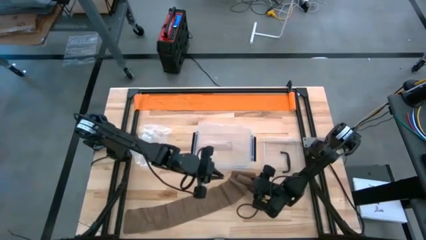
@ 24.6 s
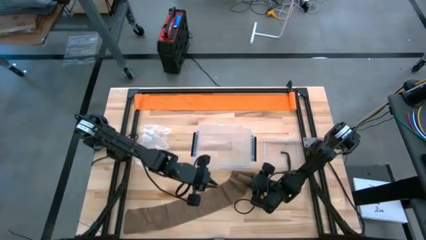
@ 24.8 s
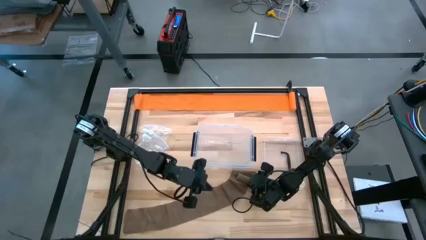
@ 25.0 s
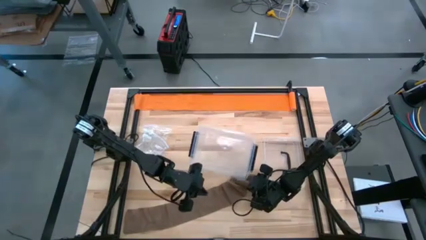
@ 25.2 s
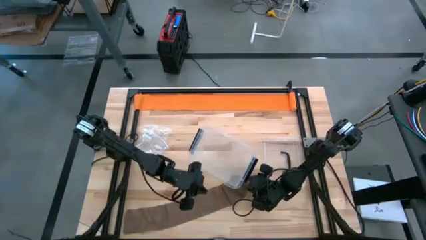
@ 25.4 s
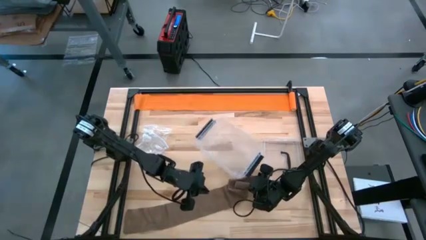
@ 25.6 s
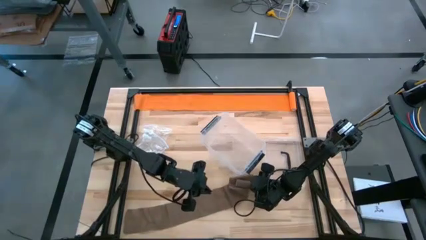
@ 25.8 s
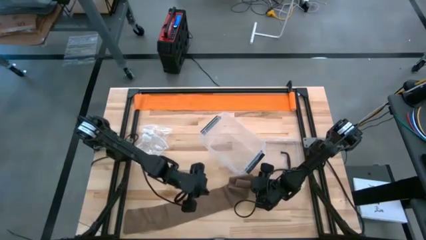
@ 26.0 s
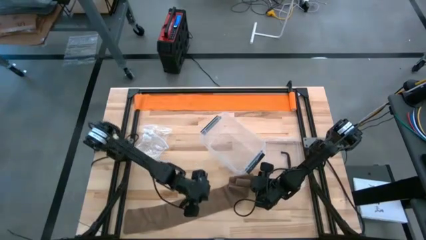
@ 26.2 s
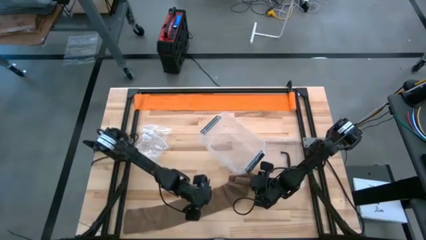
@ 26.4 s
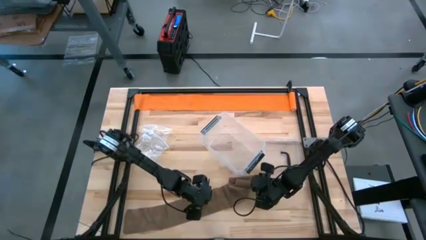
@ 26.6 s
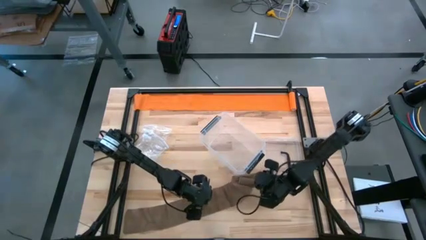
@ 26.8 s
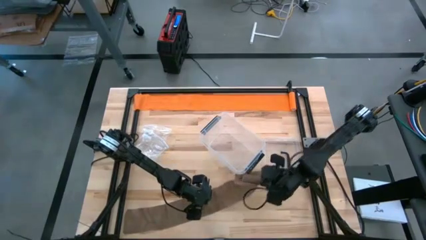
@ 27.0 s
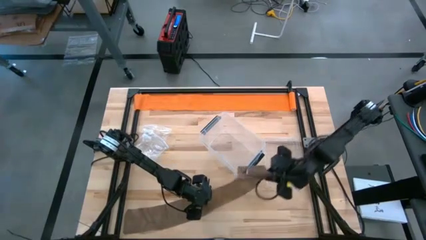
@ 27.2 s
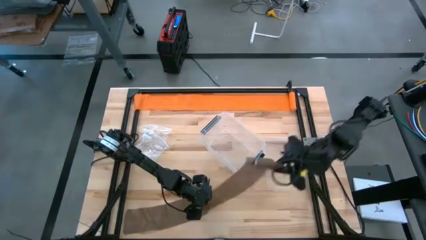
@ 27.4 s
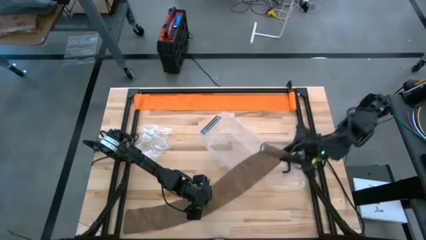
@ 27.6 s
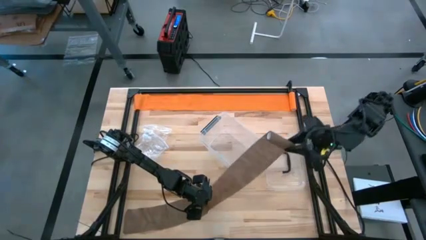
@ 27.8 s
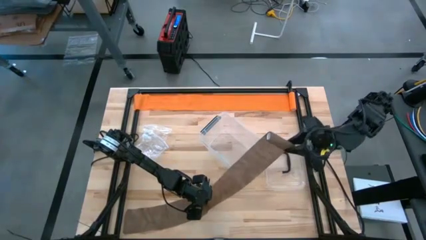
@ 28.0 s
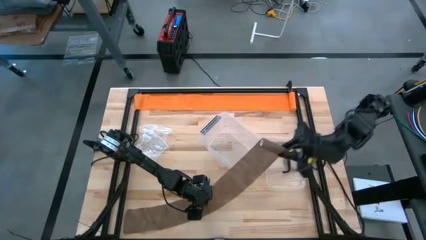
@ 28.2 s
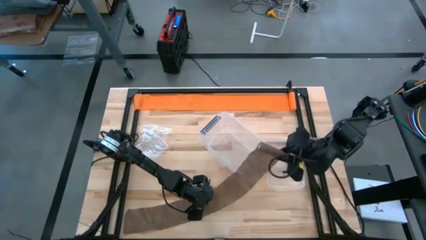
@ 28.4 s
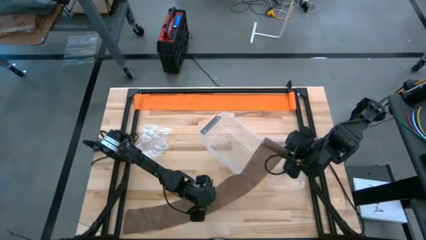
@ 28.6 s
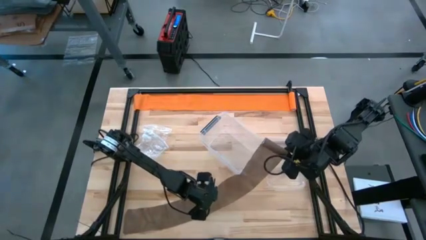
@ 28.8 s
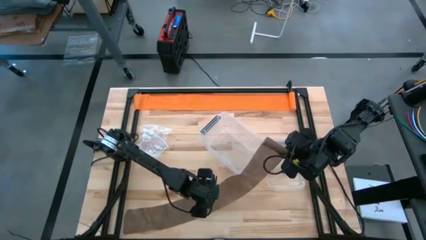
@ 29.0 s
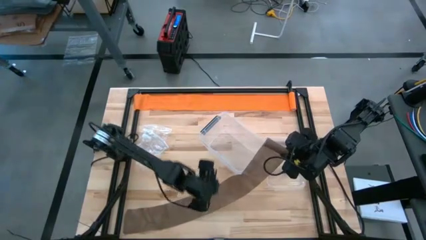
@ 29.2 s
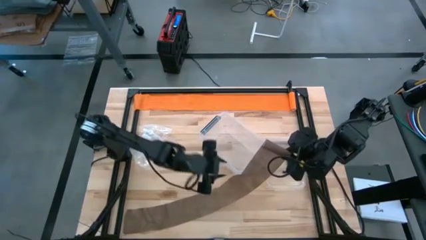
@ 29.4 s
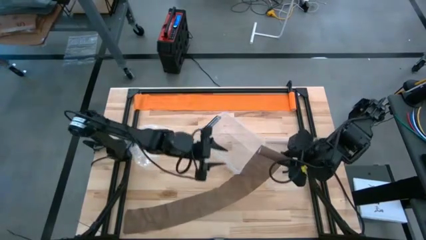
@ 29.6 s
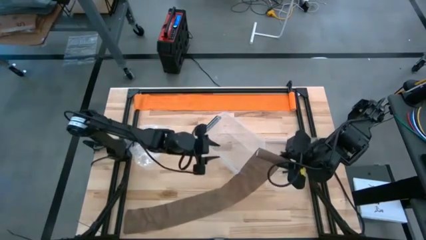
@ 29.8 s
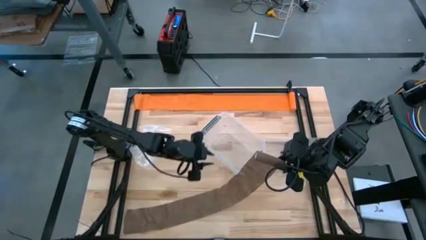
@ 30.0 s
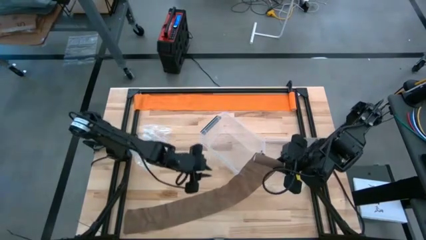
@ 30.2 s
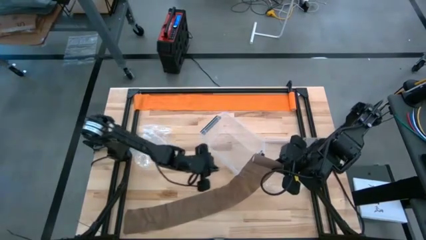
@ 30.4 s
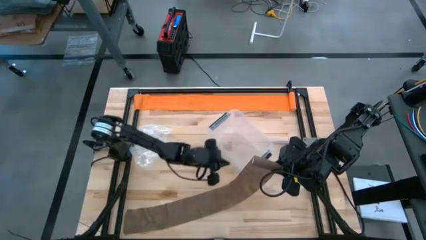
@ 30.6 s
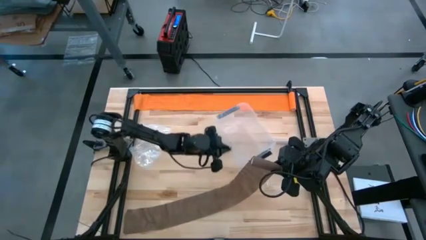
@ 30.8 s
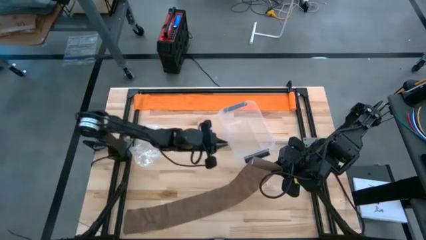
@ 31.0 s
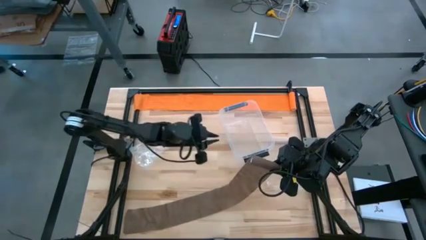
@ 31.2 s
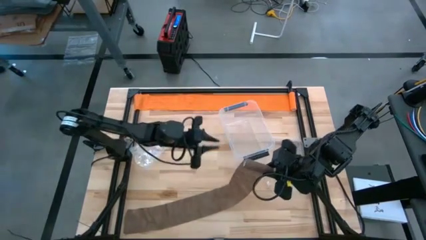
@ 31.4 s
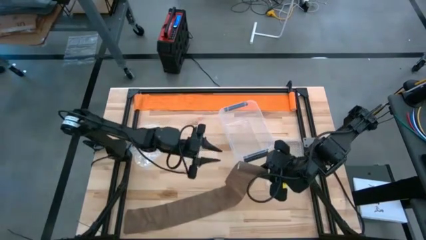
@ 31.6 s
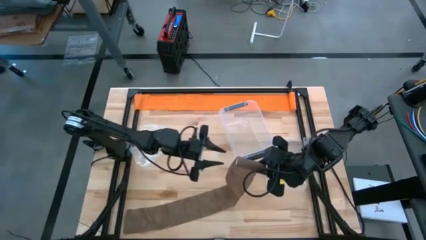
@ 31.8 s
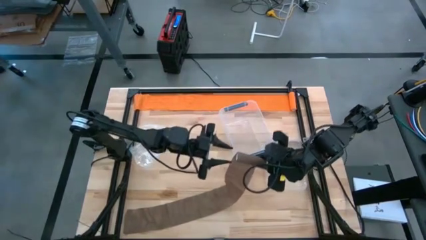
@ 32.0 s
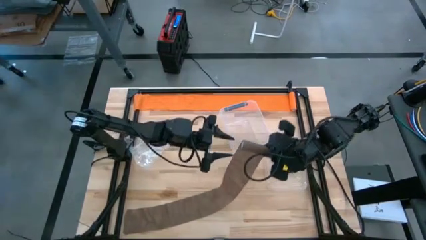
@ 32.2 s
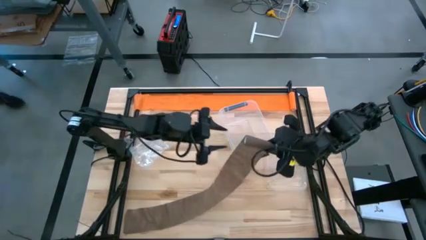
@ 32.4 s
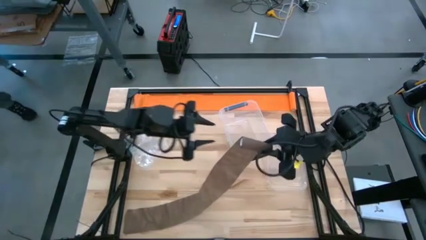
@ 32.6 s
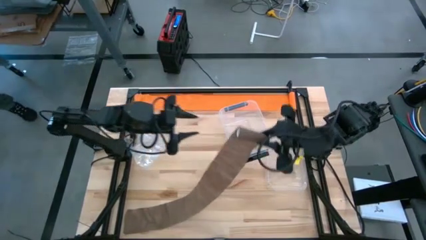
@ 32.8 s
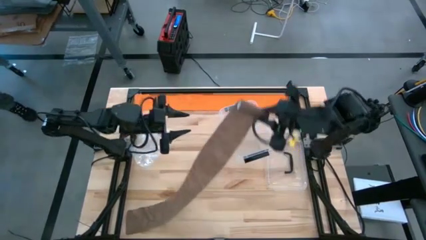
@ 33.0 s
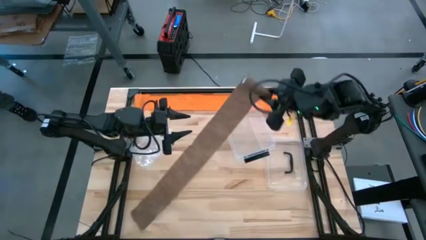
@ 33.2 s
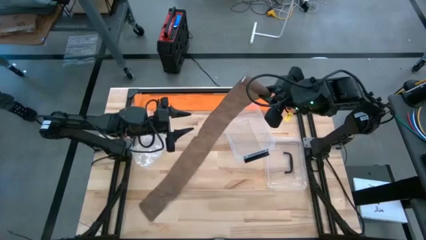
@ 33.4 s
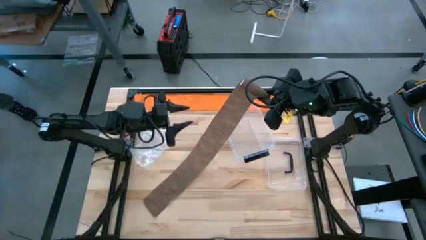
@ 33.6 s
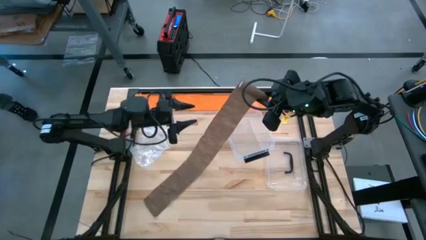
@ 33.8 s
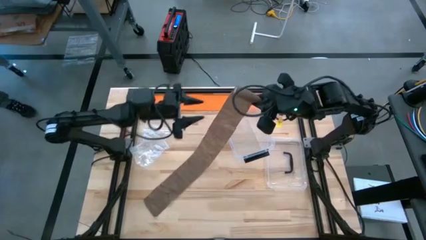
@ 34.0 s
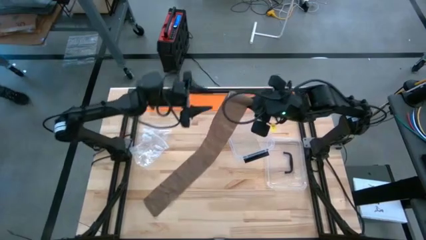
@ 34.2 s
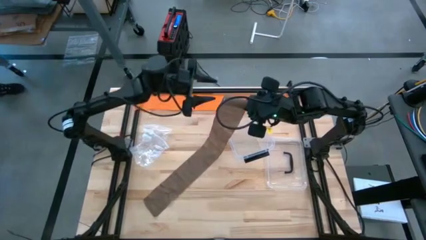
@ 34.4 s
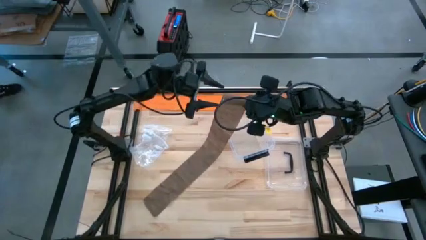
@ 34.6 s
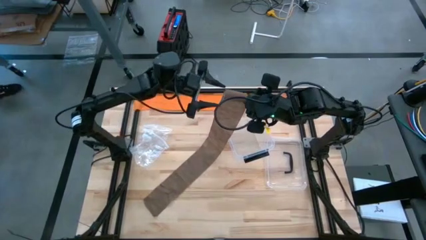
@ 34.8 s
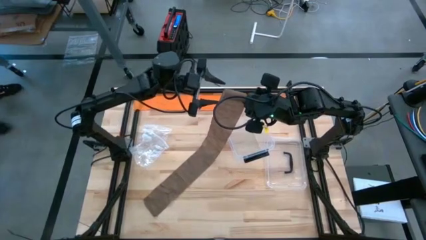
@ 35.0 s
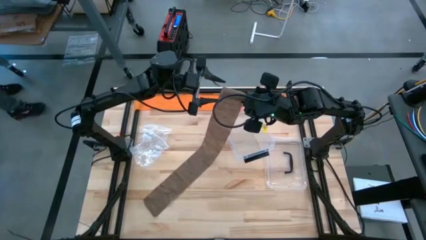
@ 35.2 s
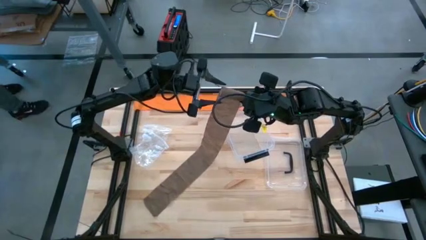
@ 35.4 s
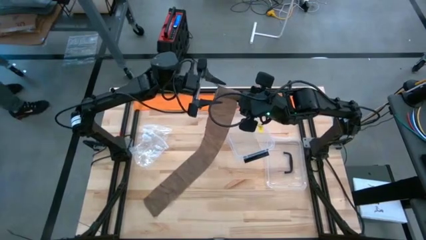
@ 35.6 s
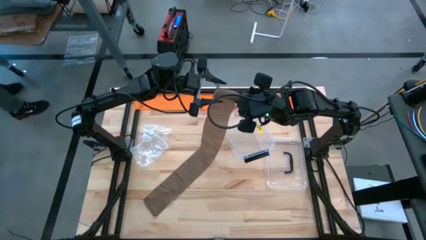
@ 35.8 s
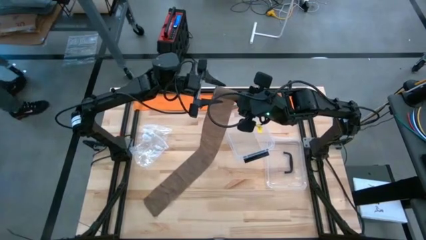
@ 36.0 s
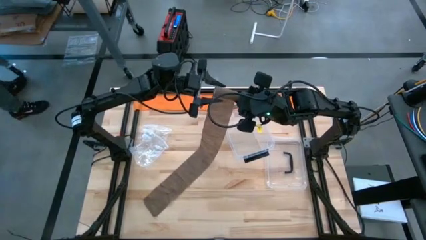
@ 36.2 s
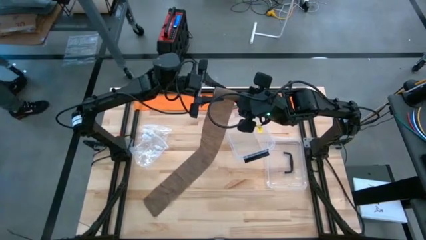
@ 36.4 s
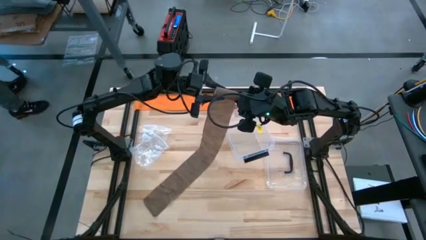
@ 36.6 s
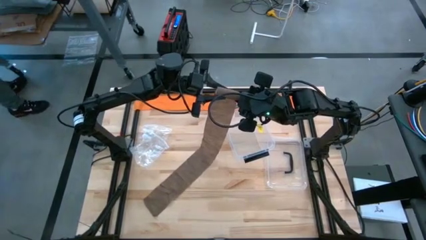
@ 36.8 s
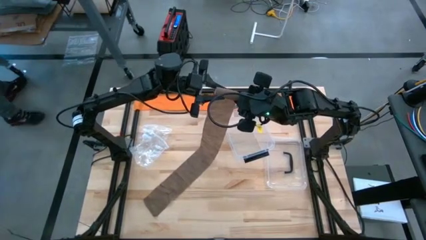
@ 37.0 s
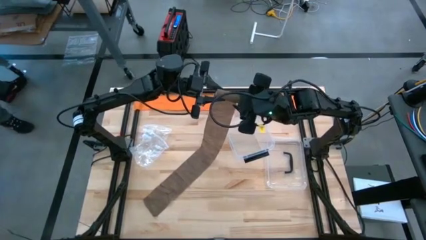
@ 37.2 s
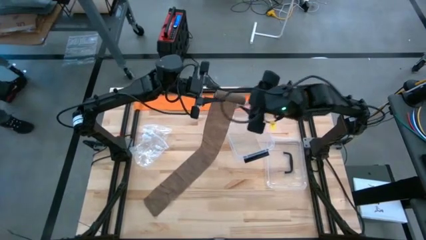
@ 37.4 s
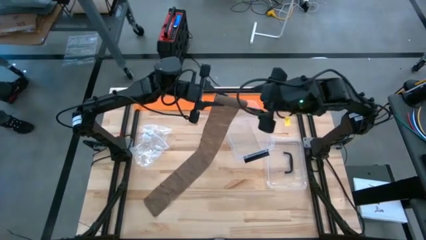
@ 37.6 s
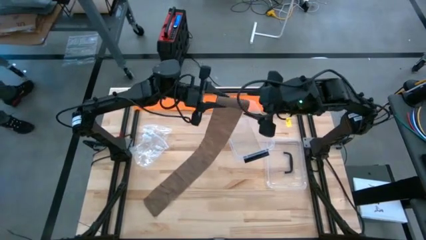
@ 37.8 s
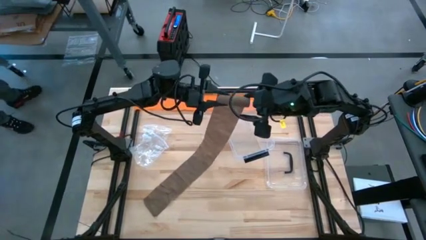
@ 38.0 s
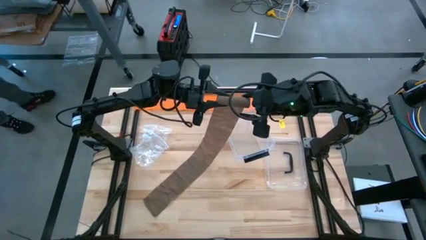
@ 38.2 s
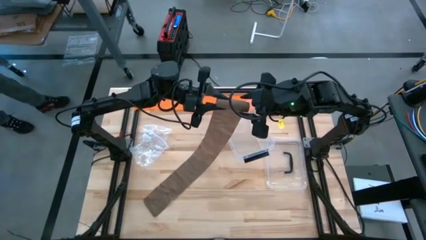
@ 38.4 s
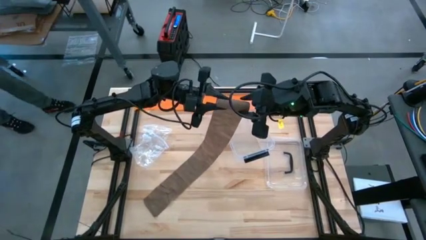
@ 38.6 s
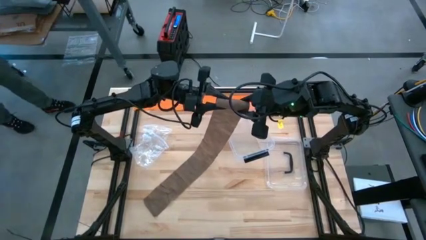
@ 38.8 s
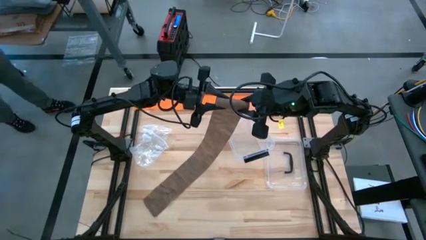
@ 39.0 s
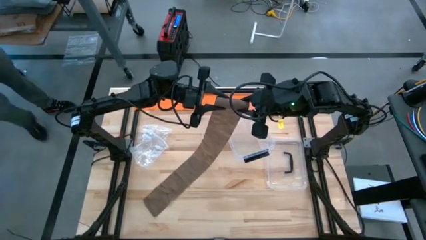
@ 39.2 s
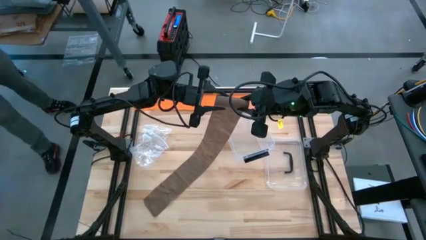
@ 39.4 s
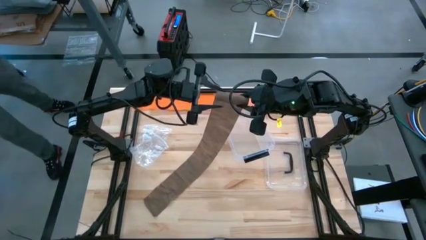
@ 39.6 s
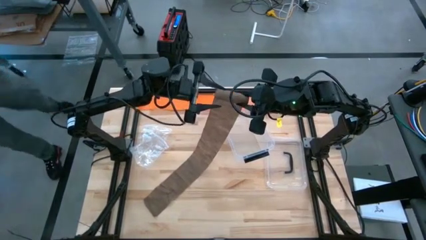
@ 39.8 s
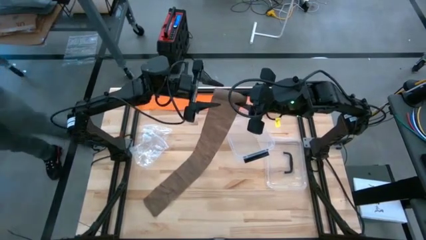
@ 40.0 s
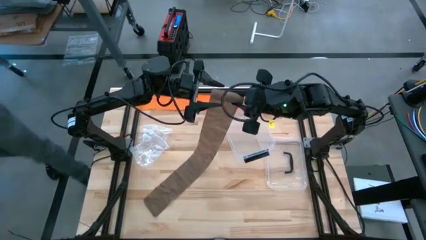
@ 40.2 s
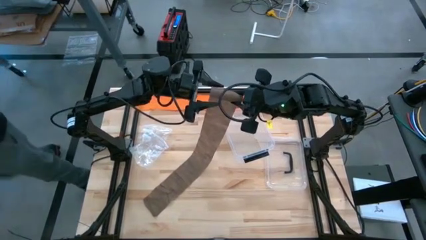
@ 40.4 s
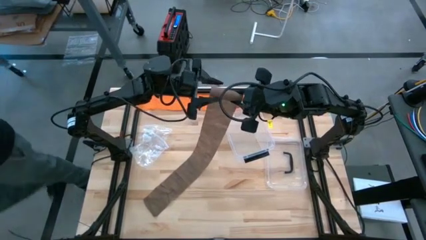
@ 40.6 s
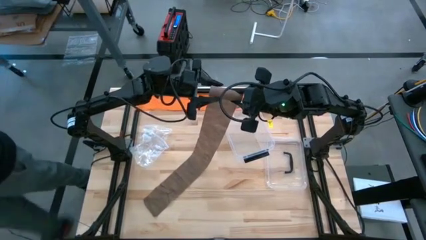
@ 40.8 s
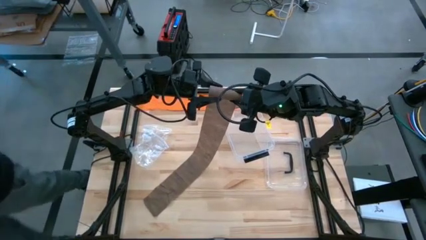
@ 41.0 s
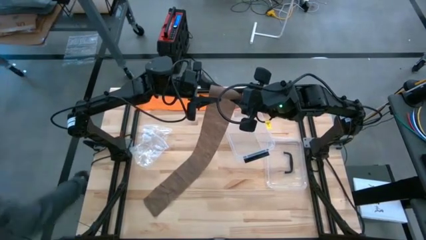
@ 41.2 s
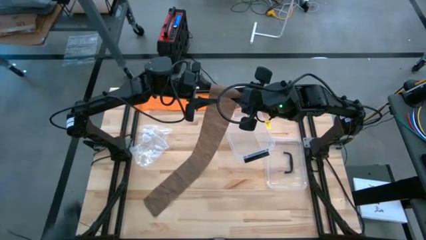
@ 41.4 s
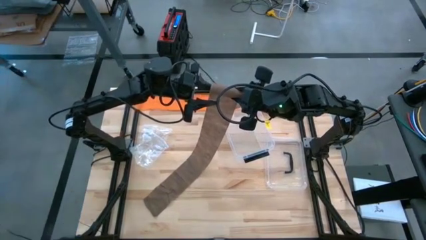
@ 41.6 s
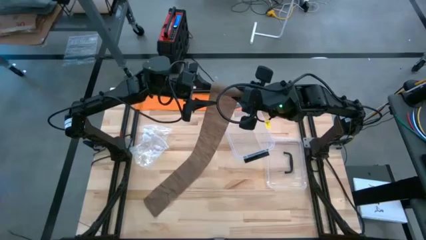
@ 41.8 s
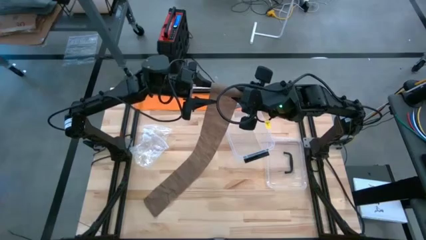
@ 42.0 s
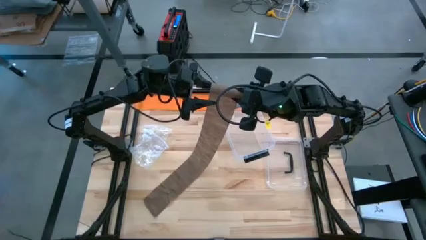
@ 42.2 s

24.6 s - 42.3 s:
Task: Roll bandage
Roll the brown bandage
